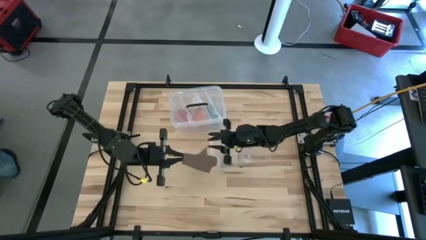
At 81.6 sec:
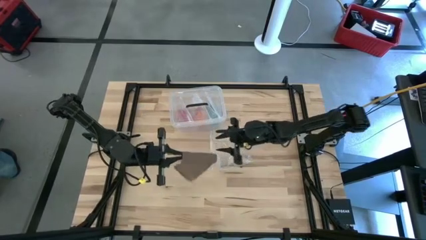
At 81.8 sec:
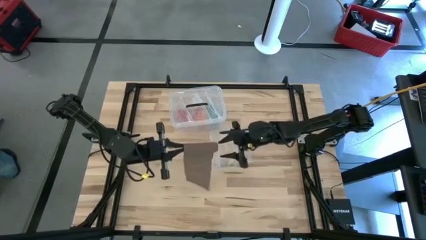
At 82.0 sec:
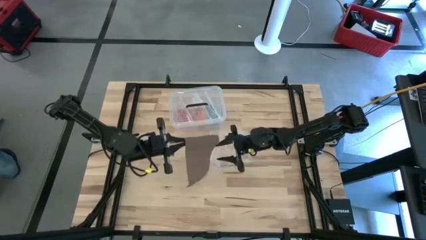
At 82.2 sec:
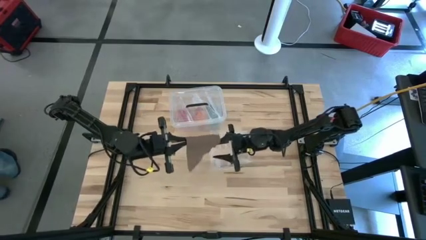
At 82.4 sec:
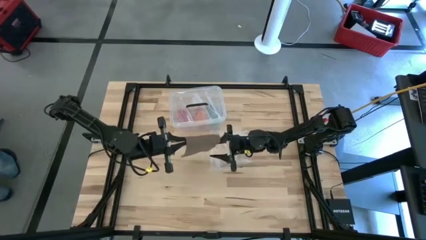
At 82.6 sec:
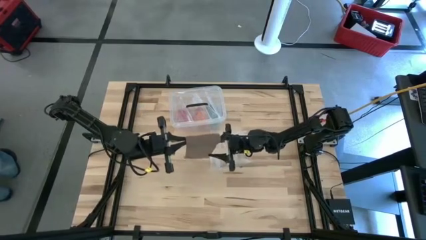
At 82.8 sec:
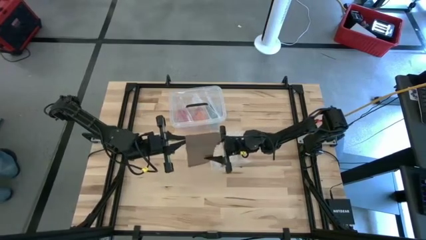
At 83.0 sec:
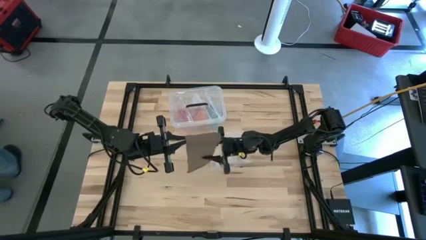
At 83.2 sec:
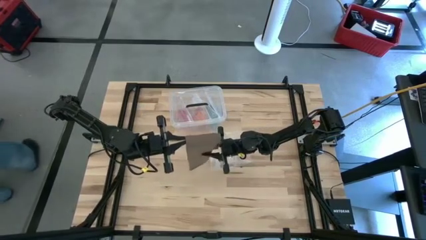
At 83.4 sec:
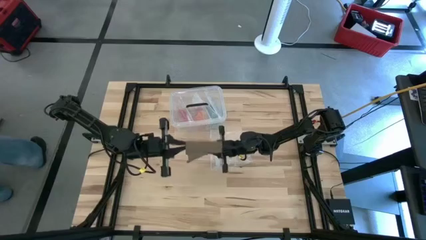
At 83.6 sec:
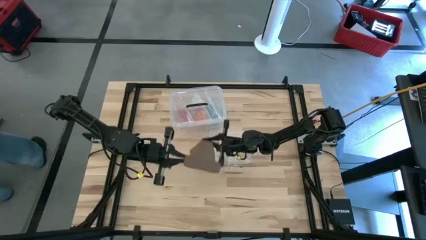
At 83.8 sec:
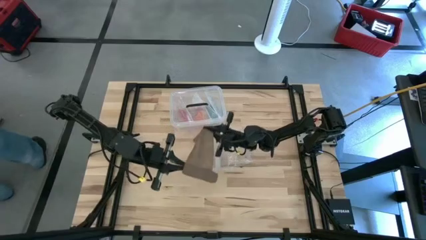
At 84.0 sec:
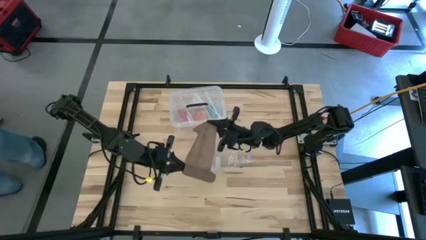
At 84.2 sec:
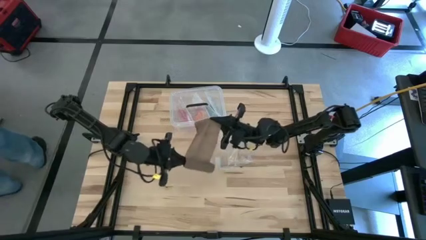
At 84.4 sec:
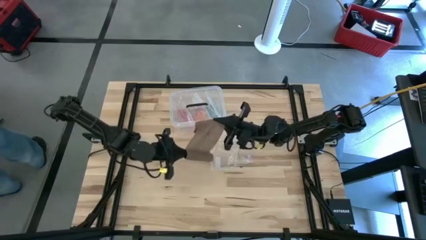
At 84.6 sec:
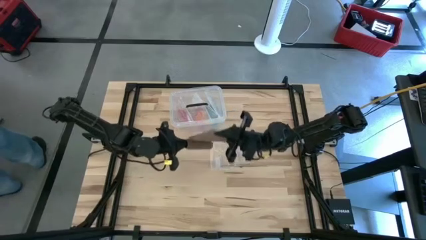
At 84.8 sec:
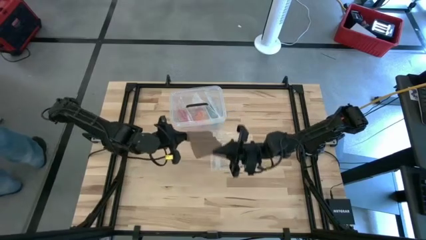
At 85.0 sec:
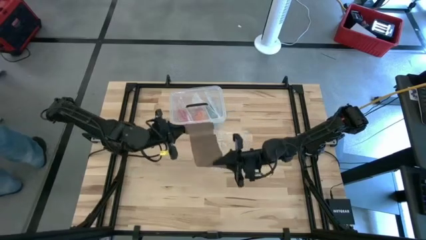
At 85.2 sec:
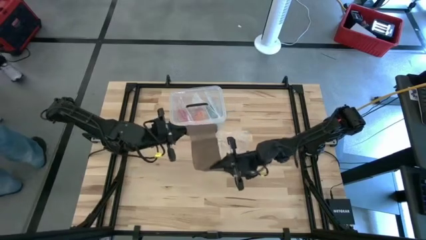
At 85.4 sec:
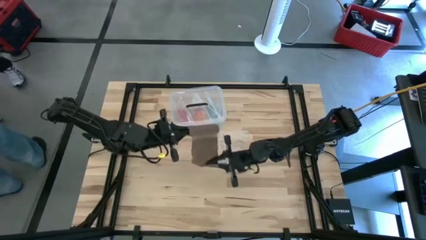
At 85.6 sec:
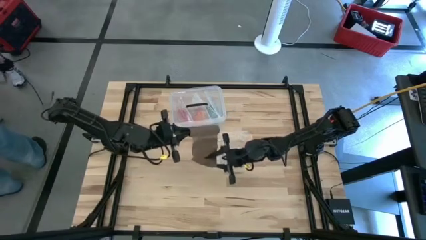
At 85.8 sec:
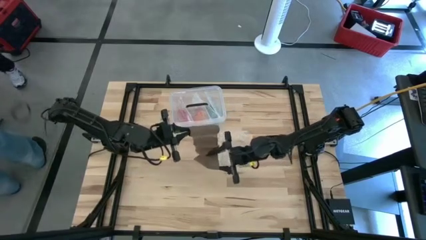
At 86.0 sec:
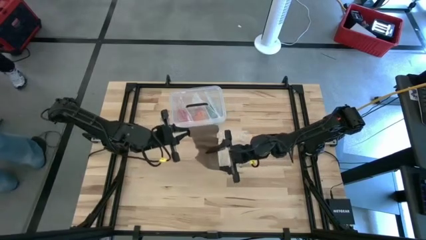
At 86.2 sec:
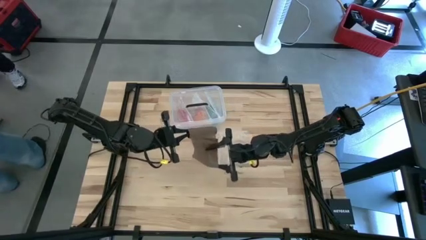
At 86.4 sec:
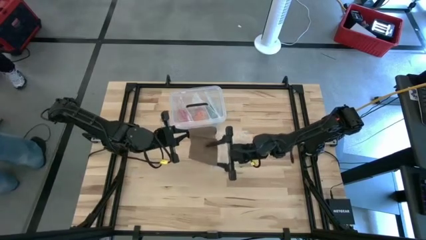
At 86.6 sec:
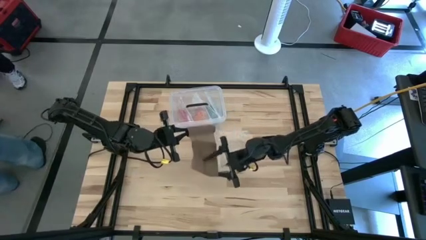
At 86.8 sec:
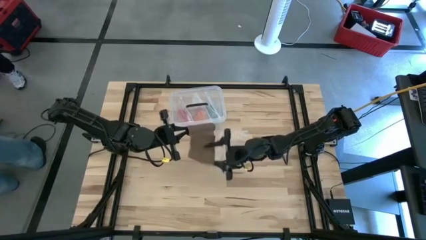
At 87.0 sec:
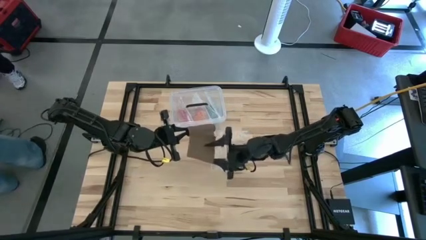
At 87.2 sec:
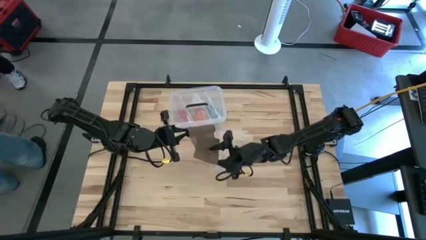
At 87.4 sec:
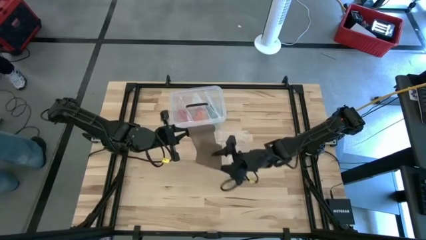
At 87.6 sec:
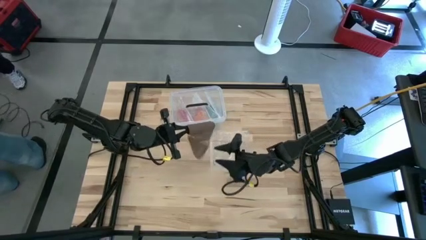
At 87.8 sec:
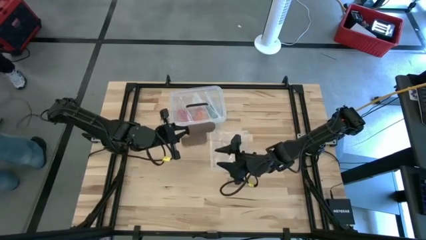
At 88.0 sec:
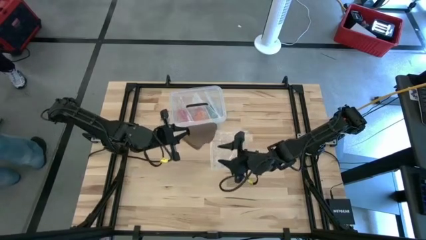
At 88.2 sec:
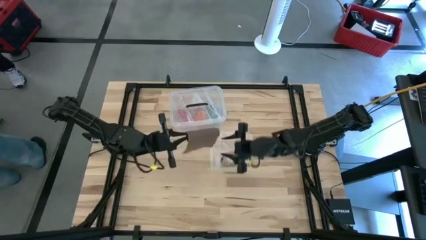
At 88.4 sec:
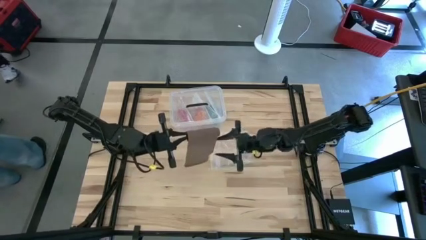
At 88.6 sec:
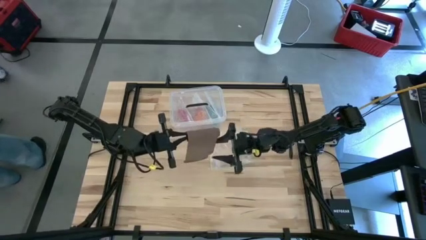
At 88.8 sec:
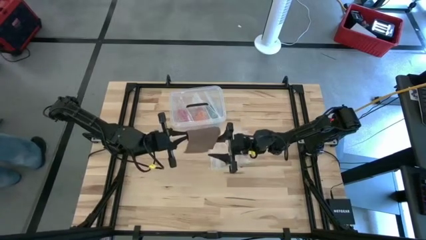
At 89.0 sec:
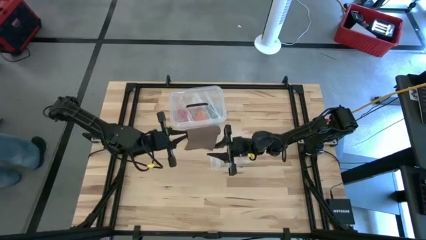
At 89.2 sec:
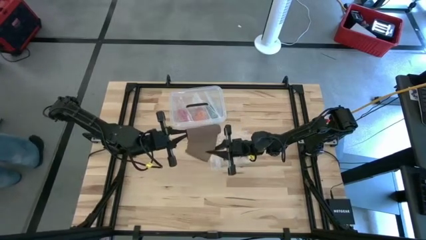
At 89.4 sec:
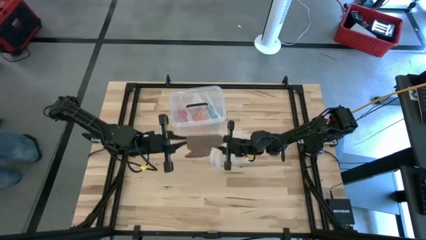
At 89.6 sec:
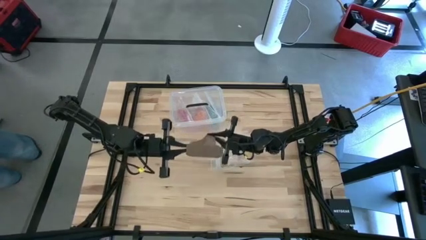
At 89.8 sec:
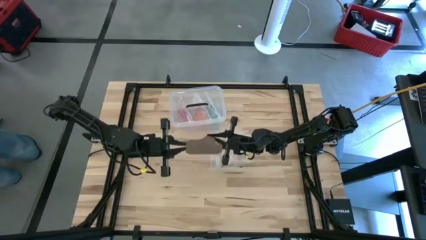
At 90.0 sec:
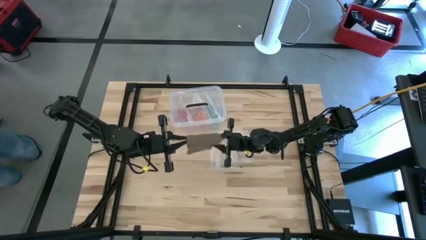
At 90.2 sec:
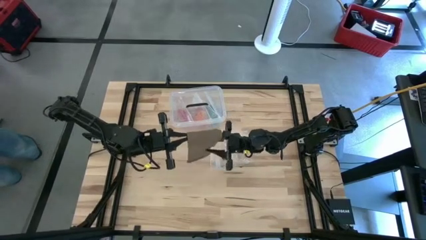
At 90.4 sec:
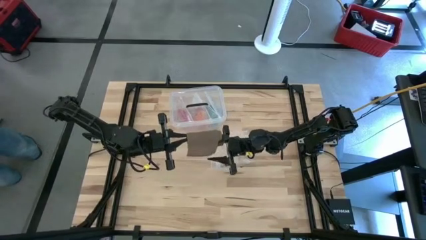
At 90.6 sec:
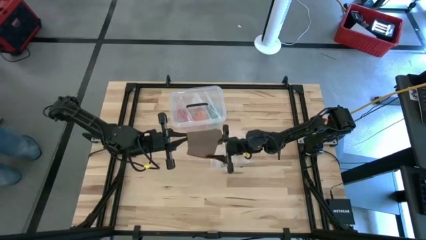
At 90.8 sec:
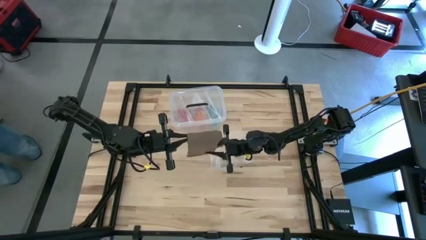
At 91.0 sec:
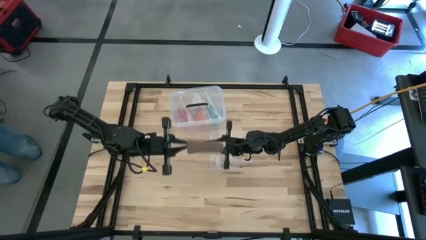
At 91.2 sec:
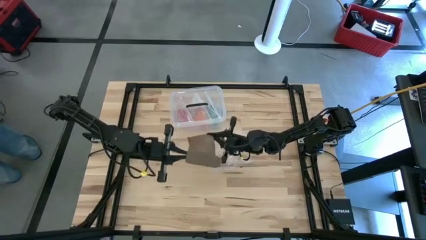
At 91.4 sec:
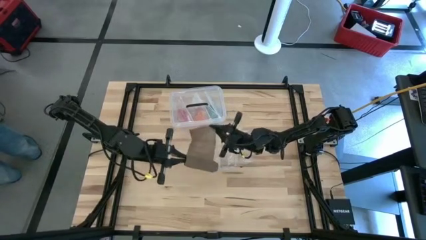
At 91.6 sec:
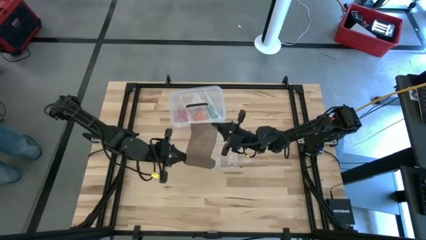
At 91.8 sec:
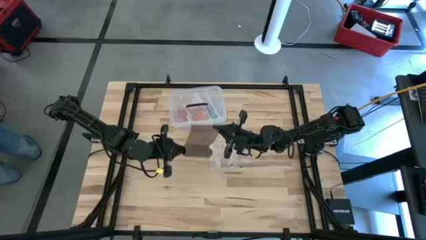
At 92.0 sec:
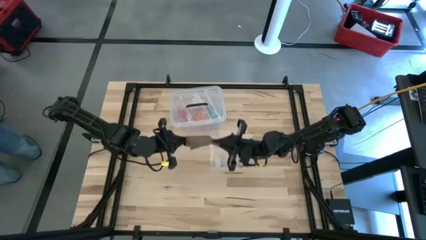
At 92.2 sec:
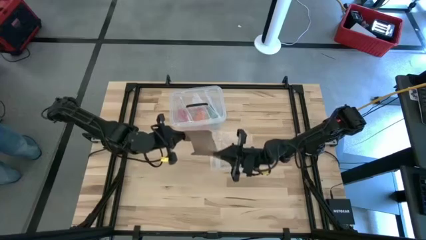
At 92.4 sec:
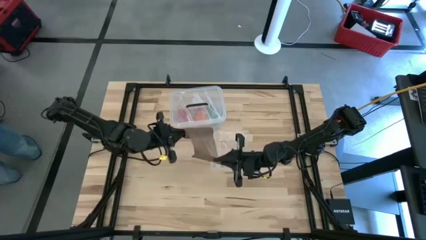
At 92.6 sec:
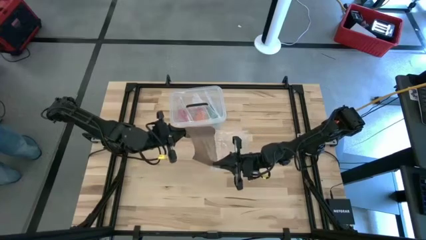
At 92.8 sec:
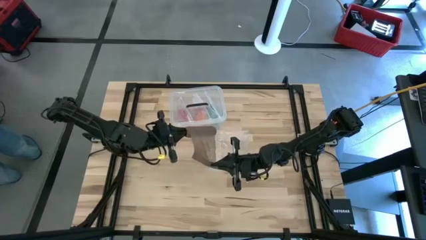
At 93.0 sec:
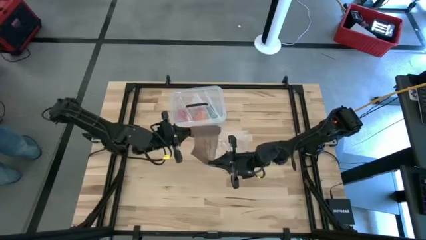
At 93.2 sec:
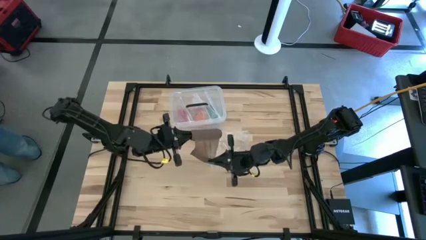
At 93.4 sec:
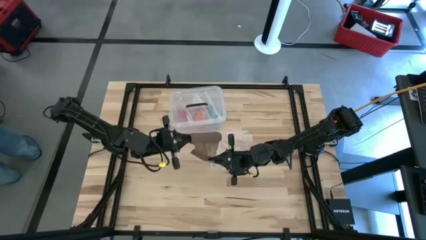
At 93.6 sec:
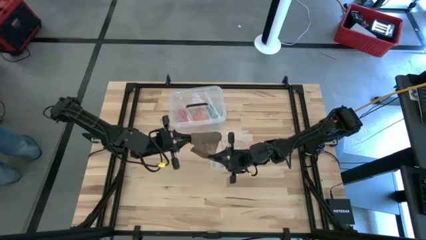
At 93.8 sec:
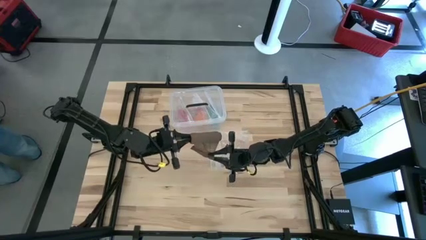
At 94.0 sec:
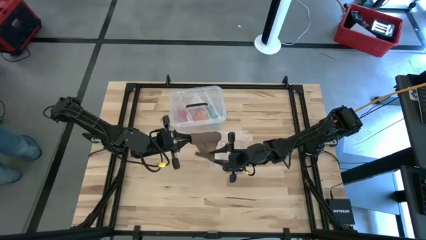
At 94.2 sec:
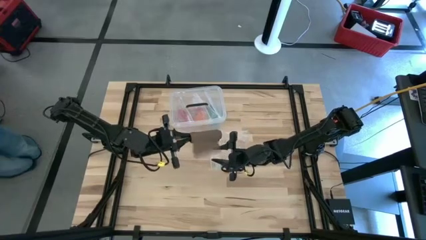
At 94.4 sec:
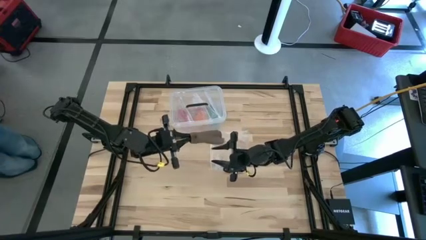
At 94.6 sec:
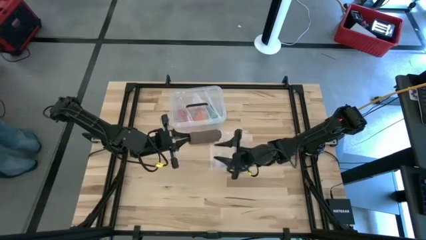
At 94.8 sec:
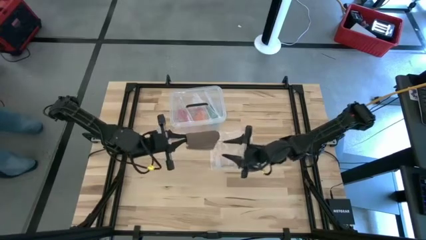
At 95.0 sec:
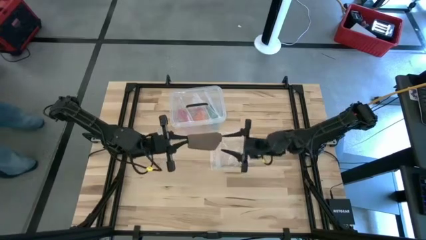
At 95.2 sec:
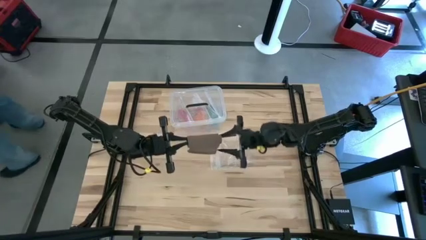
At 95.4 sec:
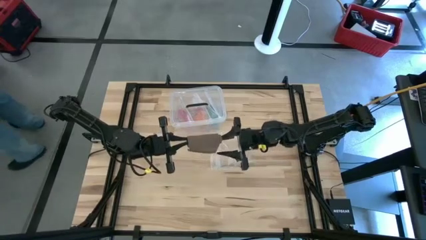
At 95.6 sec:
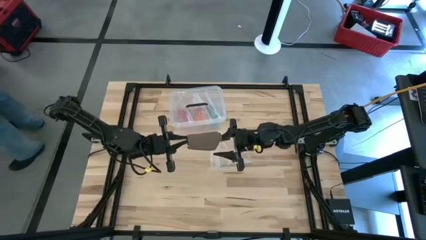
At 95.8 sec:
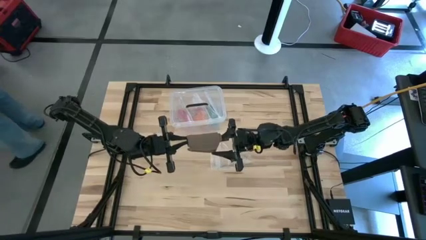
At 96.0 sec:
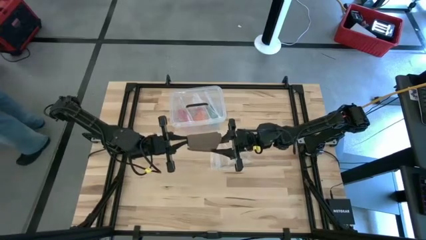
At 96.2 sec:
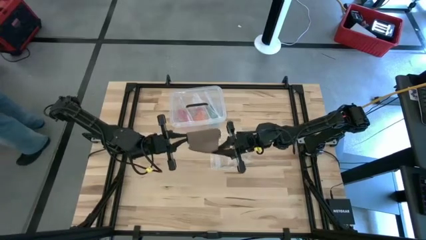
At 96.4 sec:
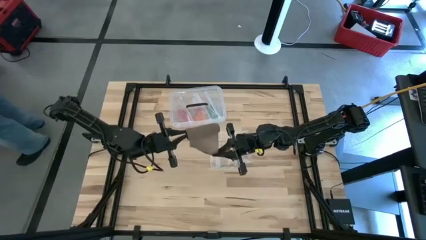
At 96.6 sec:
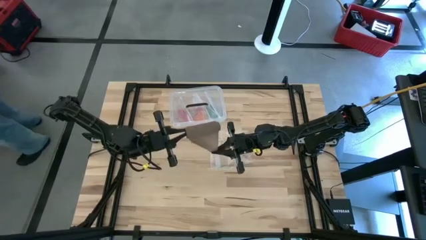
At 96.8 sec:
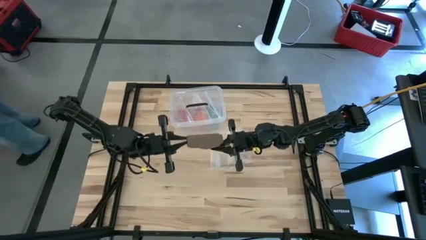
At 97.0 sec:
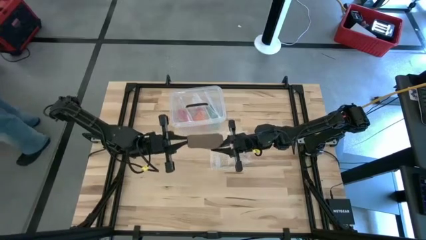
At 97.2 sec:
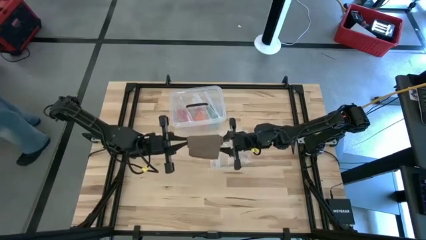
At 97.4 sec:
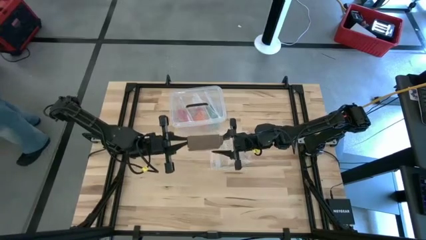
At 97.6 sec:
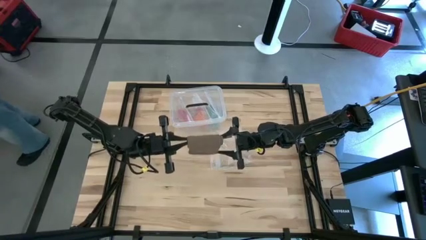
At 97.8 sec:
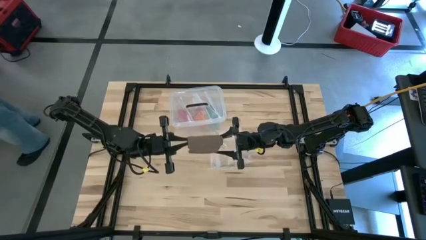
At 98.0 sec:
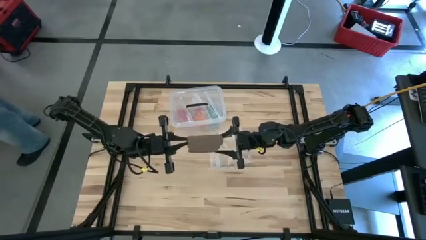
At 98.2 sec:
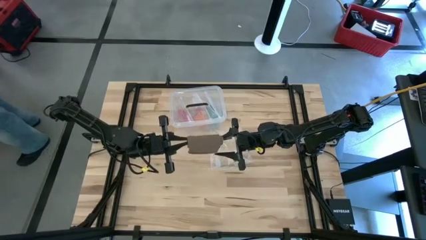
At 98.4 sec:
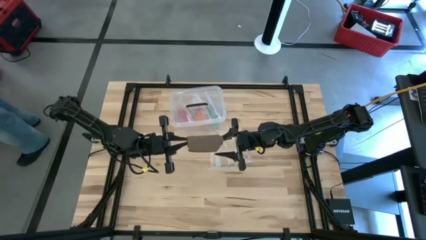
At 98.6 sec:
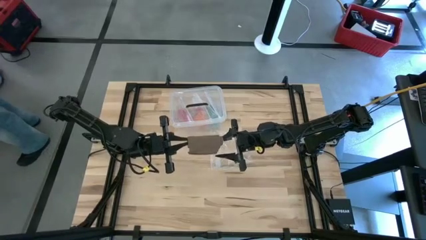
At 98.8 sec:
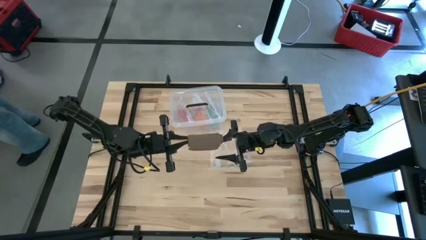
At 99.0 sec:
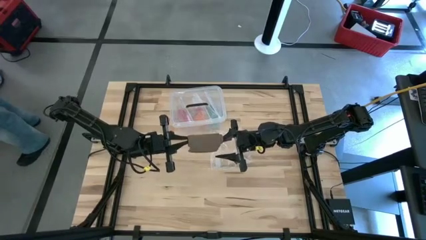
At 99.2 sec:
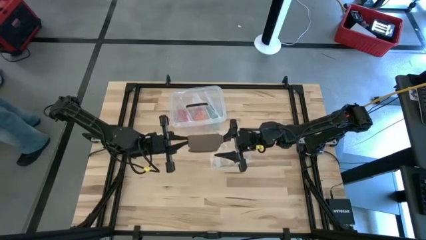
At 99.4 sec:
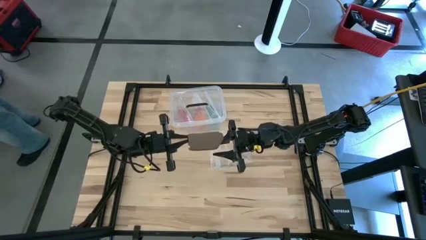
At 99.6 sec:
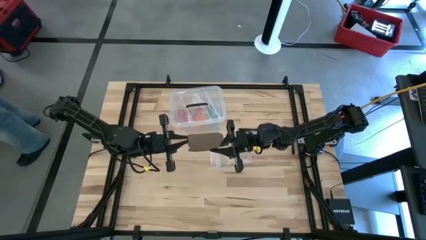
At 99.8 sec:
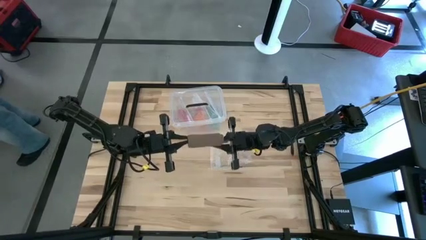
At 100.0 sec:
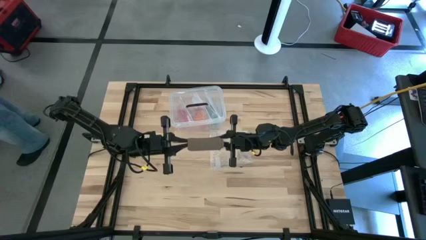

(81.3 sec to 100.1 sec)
Task: Roll bandage
Roll the brown bandage
